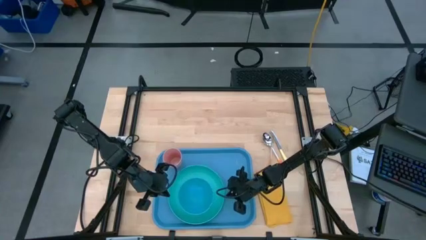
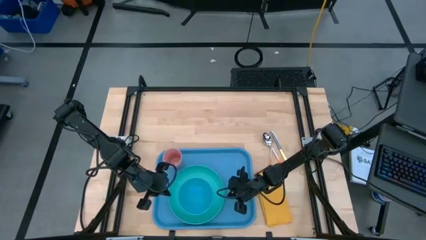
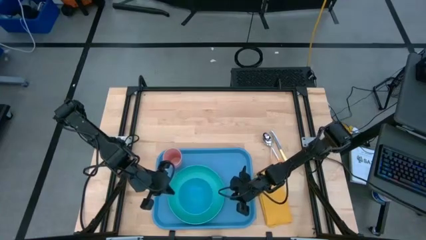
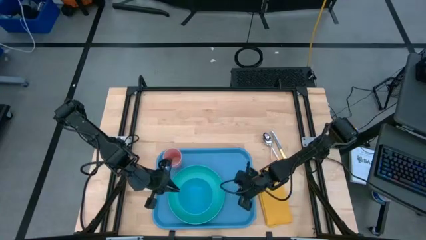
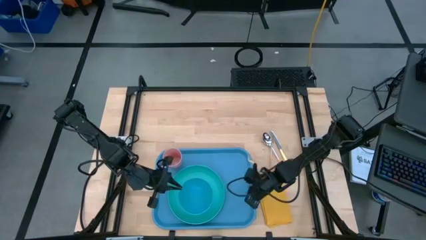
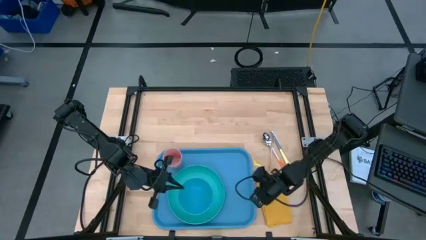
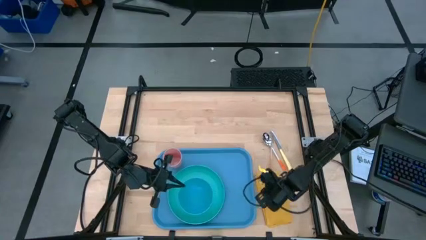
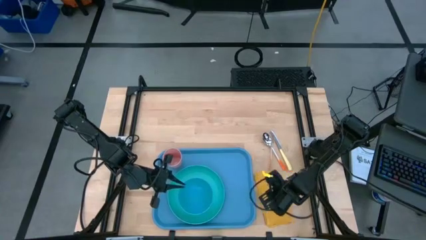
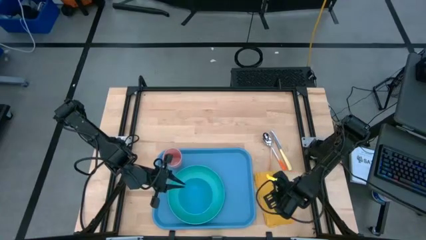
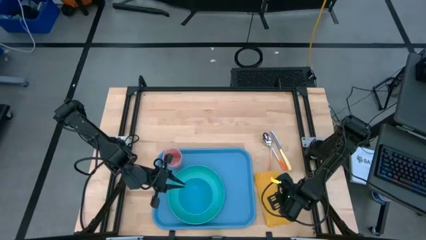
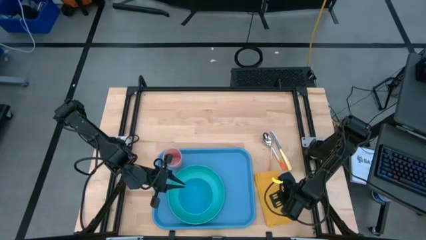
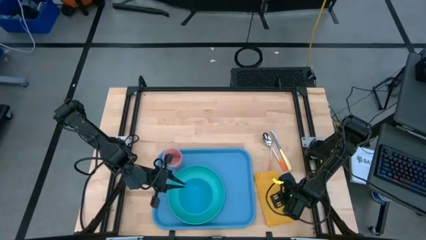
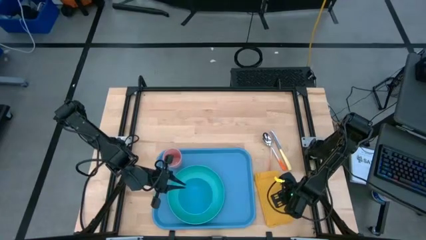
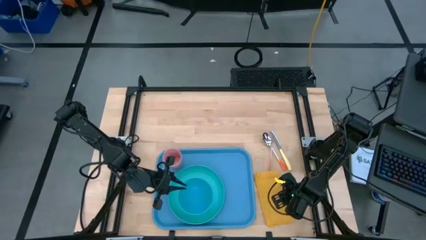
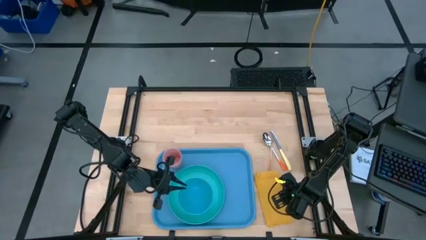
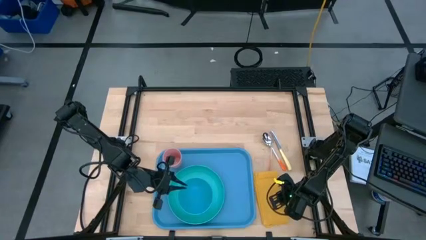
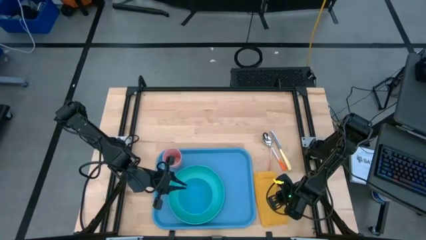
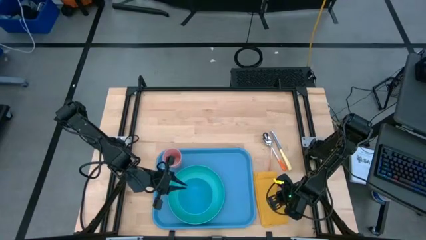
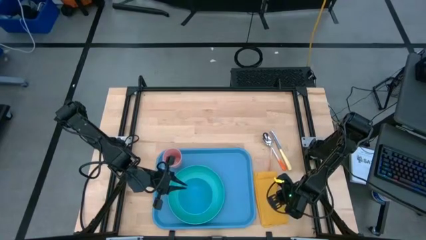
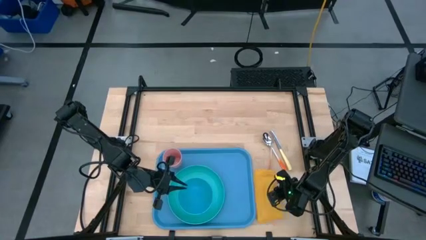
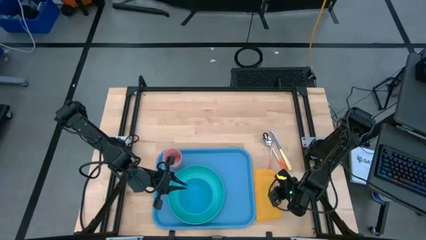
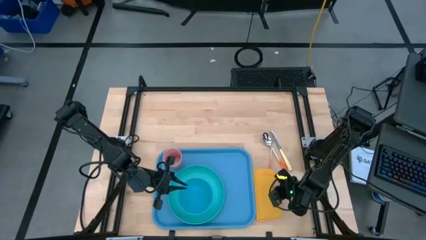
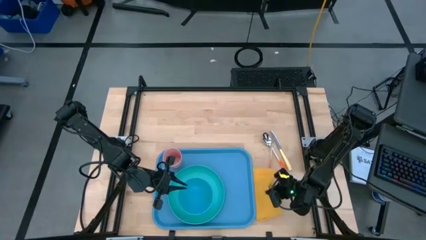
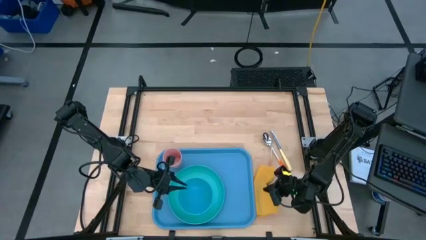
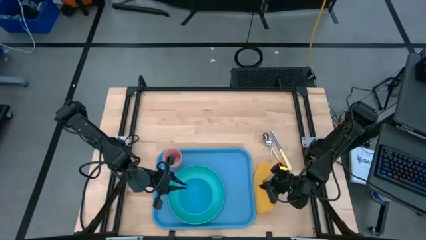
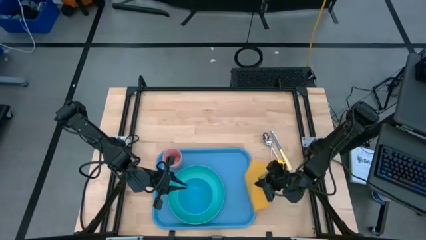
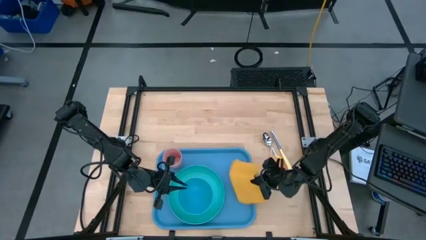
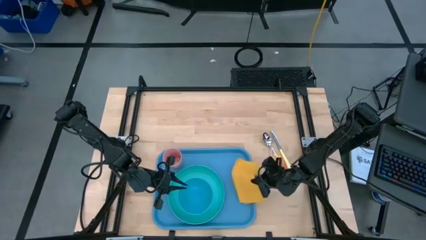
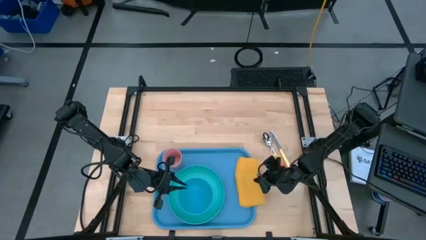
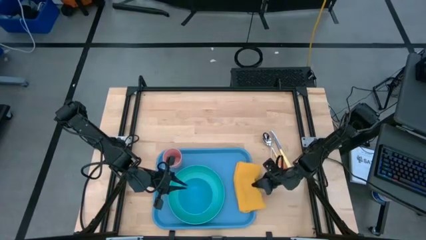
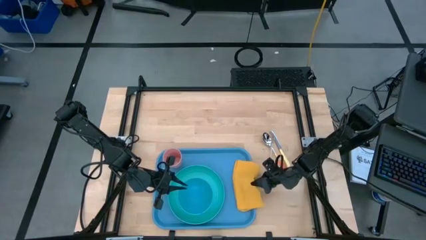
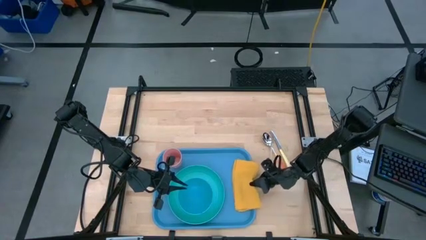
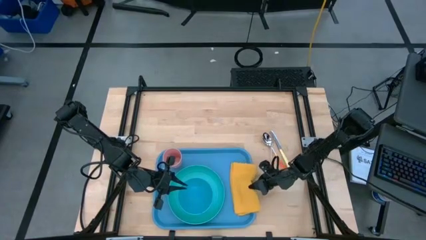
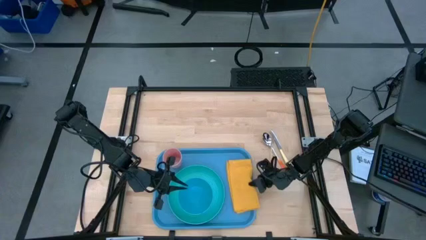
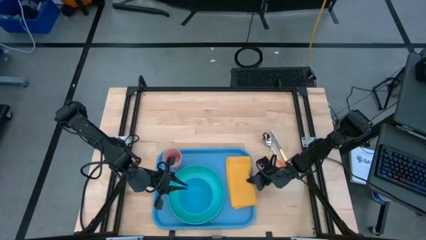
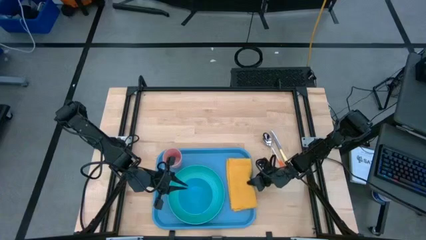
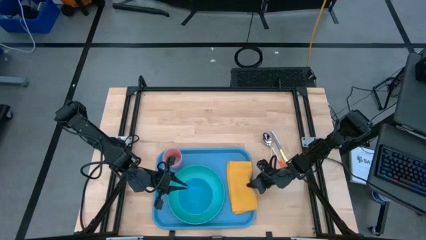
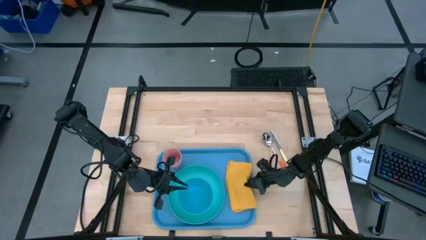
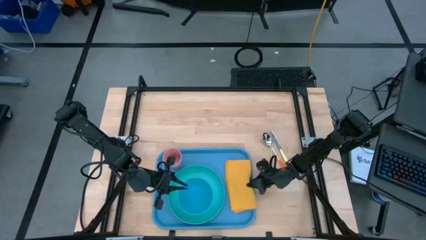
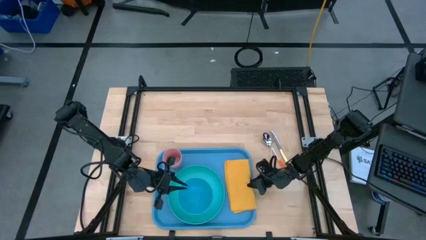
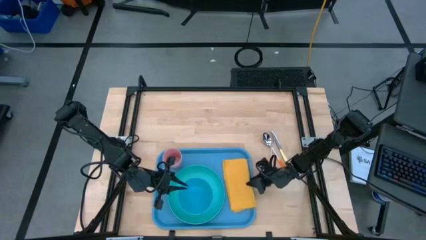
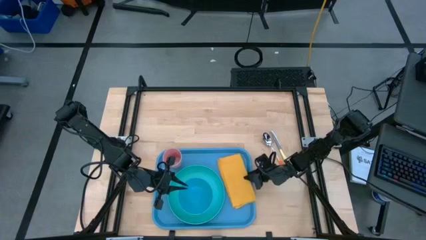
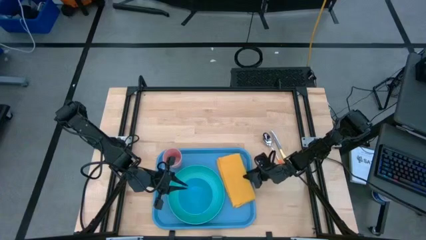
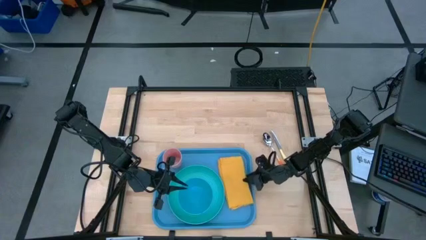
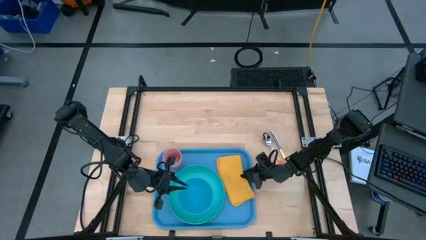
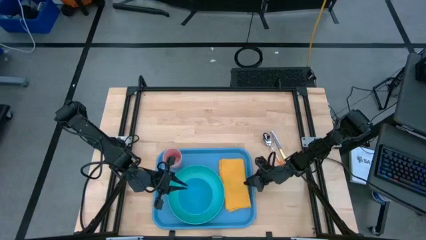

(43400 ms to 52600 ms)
Task: Set up tray
Put the napkin to the right of the plate on the serving tray

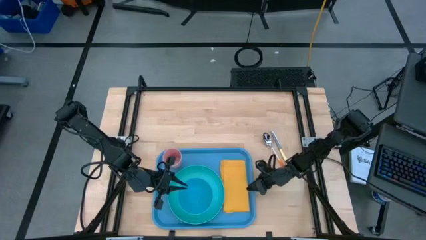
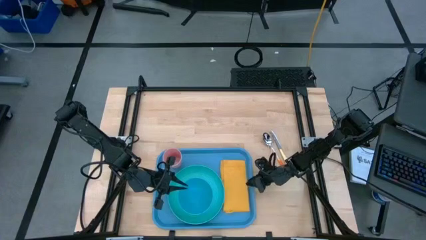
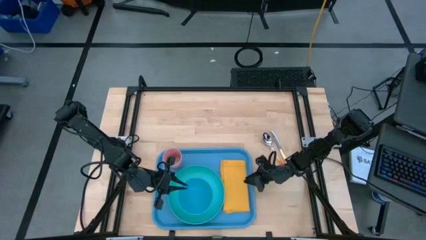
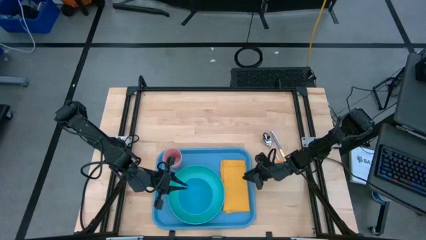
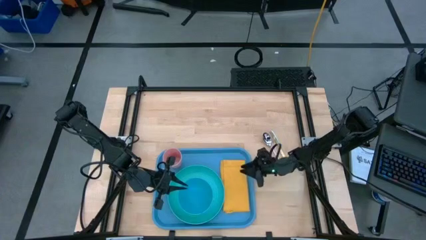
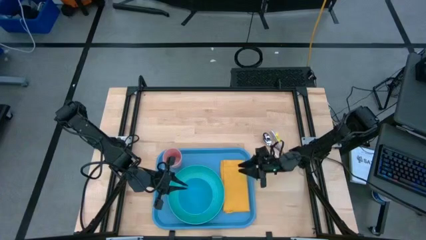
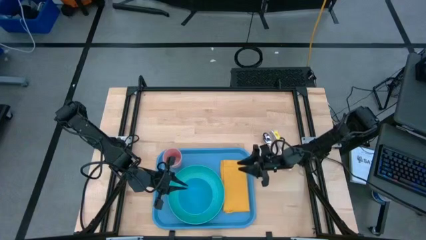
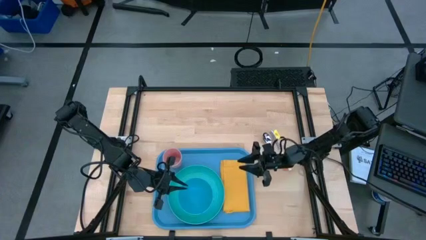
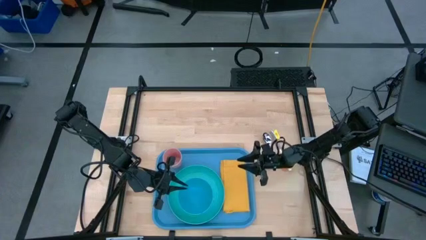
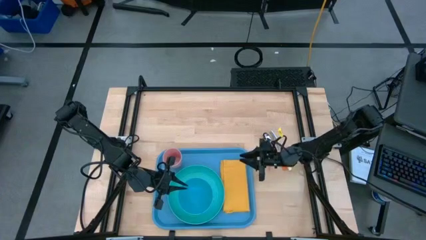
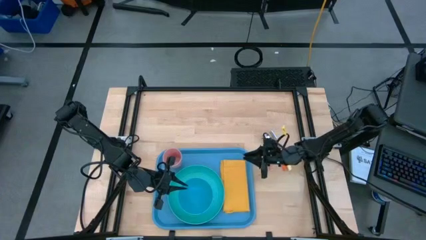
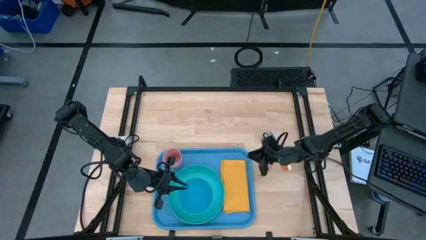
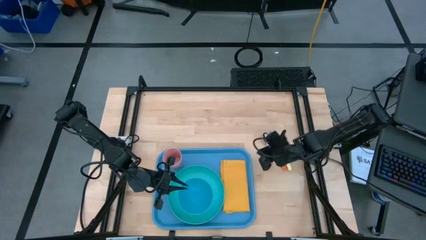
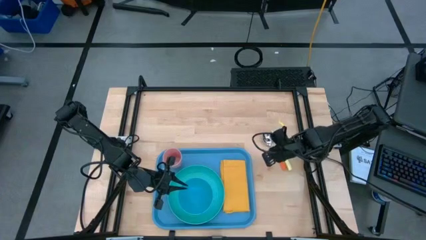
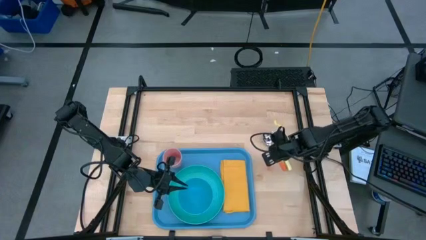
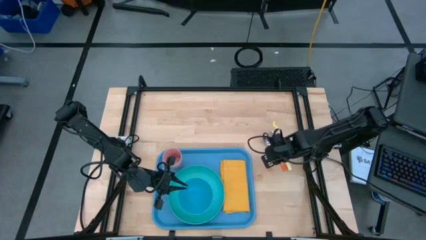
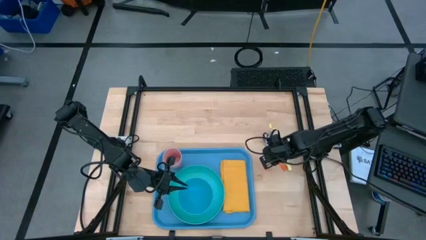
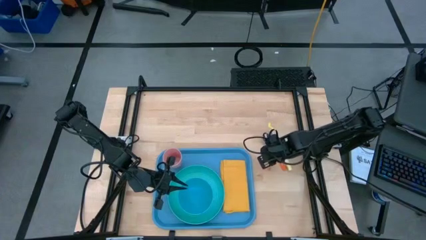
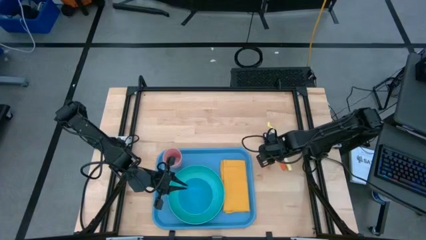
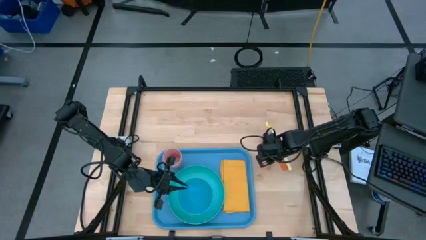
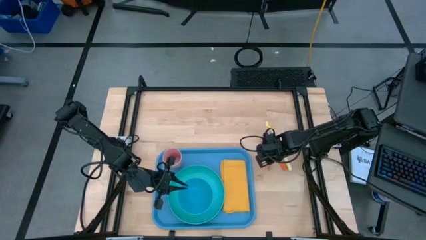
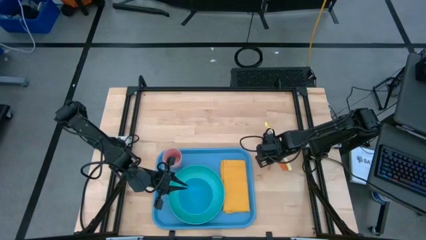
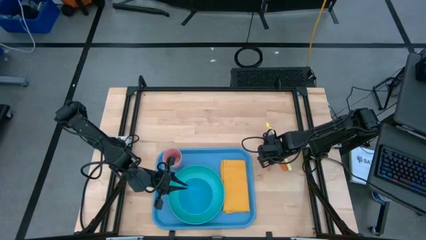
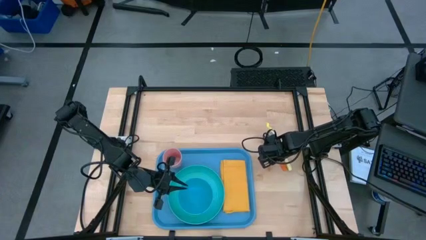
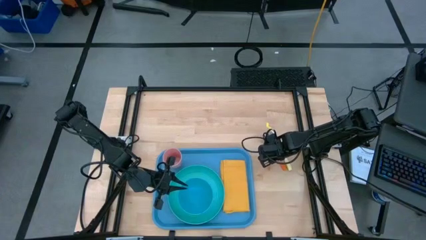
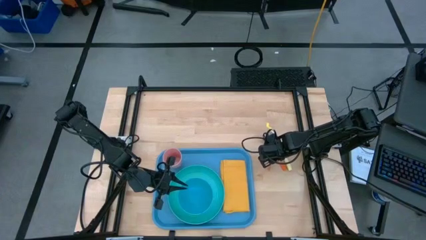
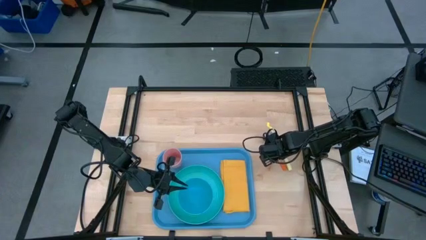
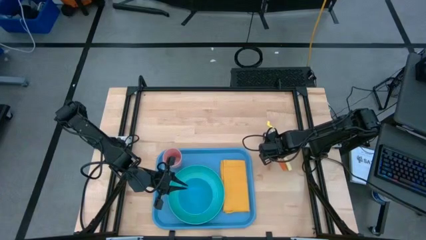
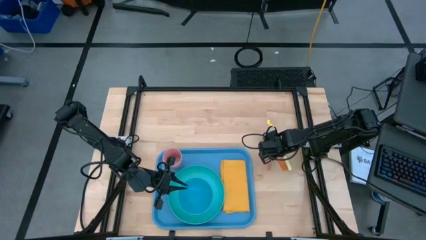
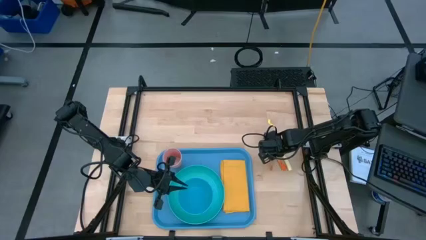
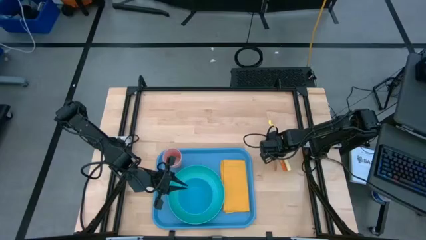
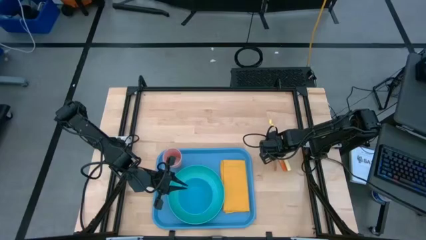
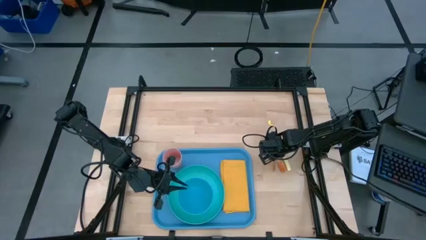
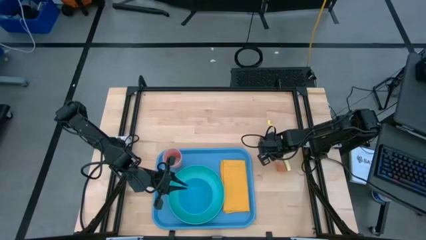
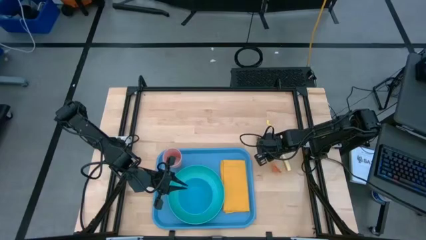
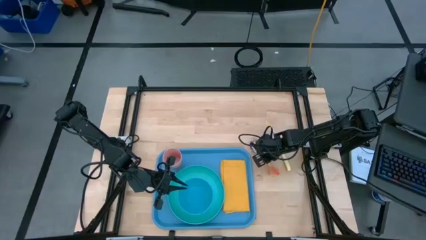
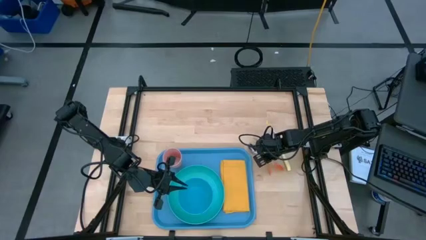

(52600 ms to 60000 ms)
Adjust the silverware on the table
